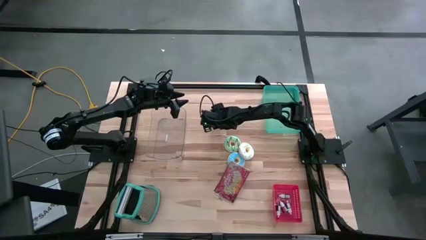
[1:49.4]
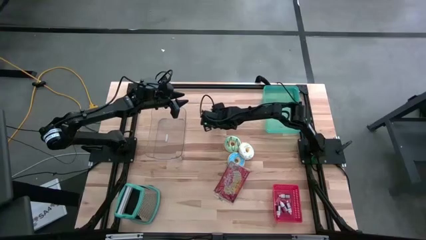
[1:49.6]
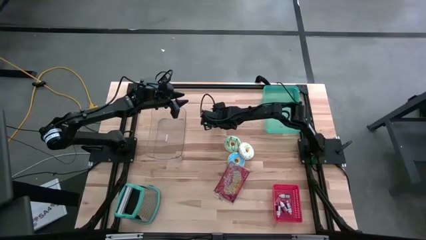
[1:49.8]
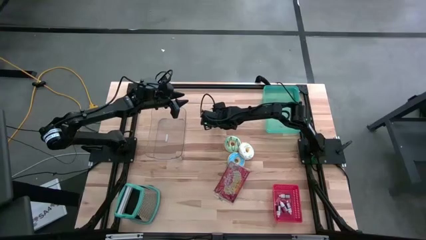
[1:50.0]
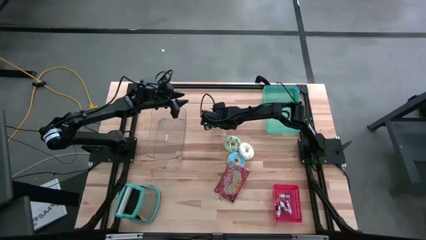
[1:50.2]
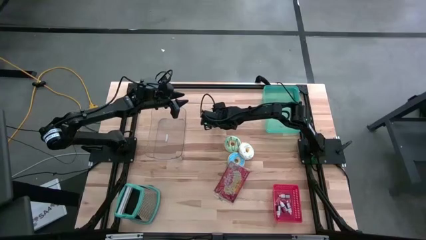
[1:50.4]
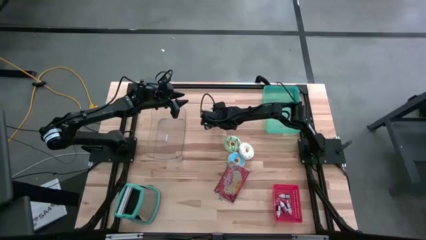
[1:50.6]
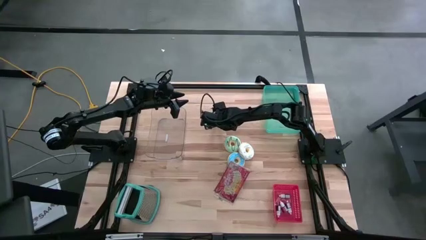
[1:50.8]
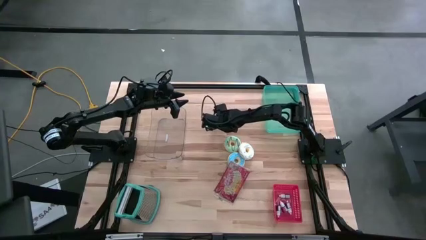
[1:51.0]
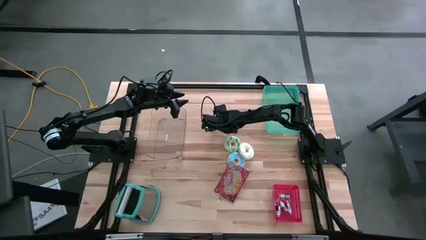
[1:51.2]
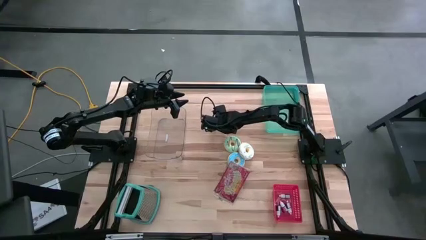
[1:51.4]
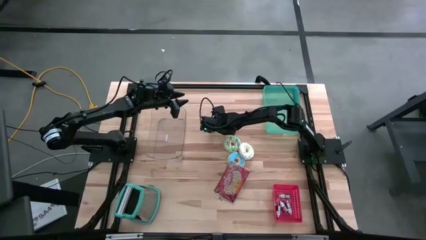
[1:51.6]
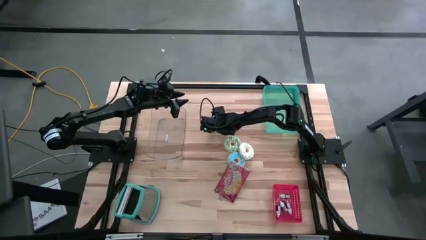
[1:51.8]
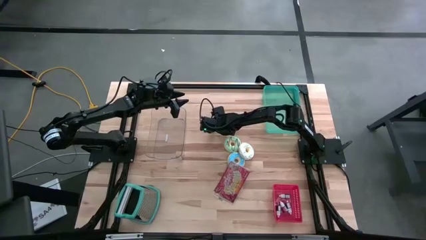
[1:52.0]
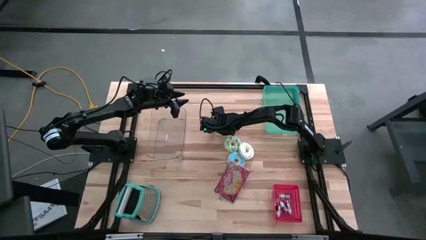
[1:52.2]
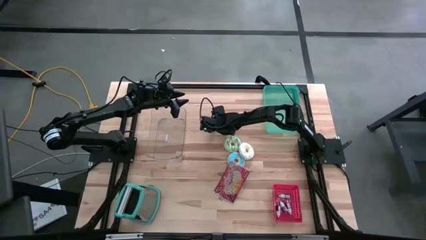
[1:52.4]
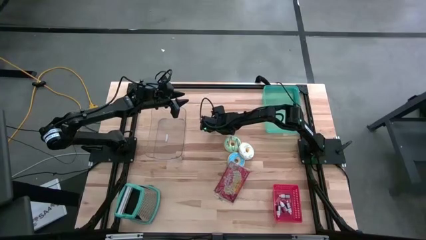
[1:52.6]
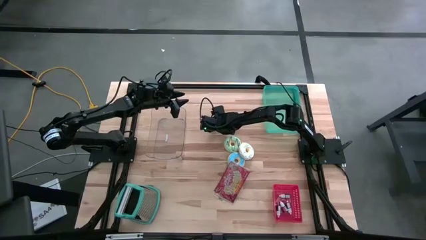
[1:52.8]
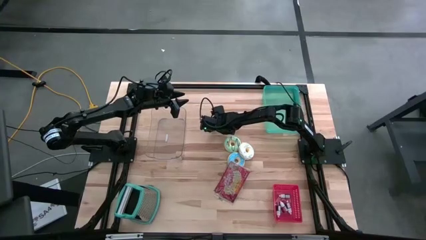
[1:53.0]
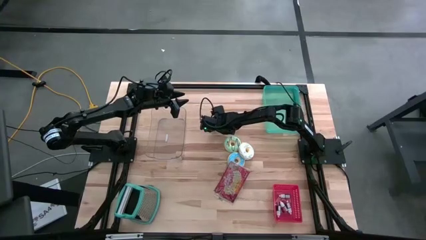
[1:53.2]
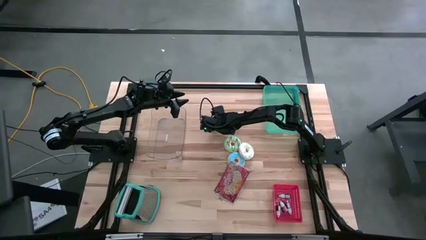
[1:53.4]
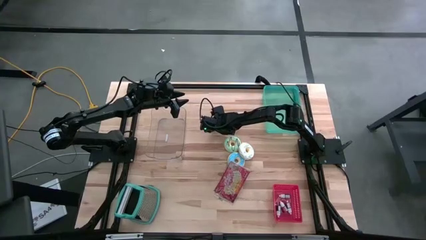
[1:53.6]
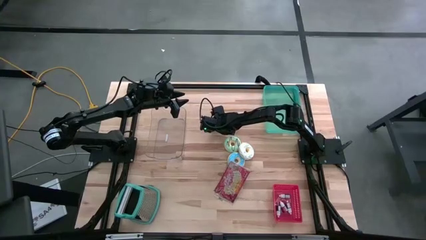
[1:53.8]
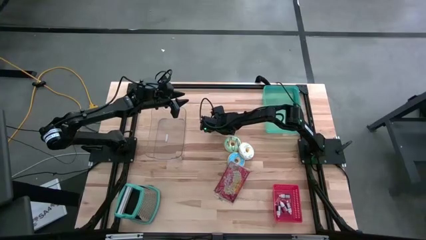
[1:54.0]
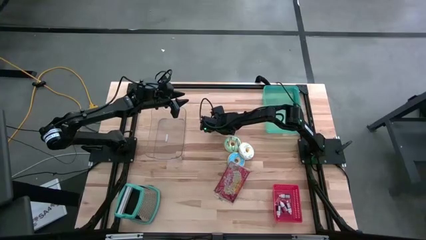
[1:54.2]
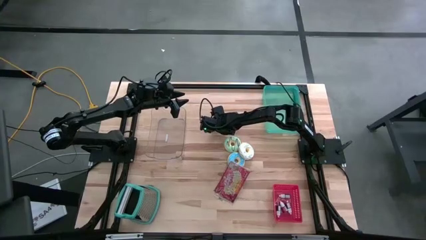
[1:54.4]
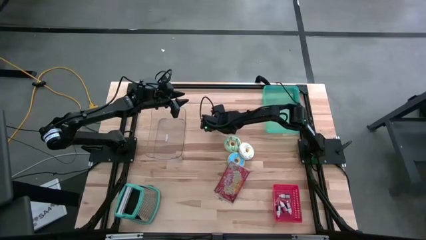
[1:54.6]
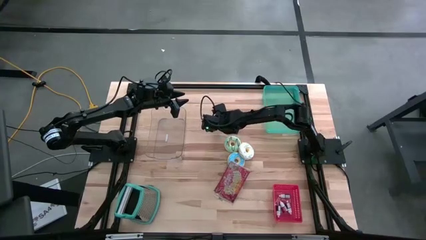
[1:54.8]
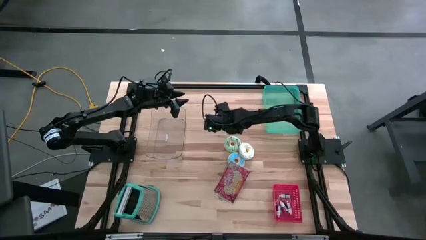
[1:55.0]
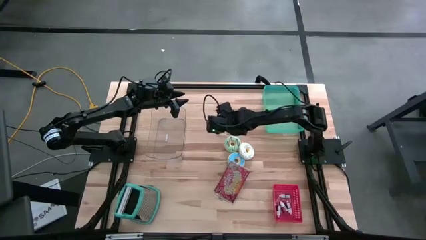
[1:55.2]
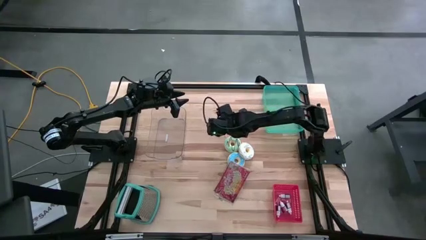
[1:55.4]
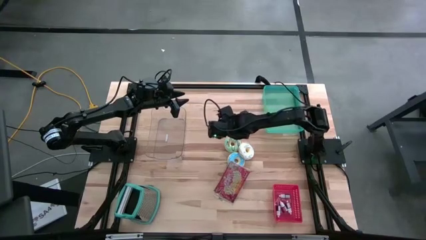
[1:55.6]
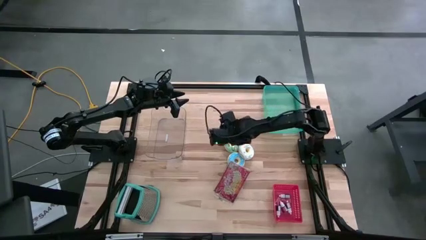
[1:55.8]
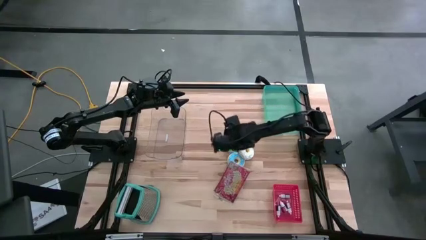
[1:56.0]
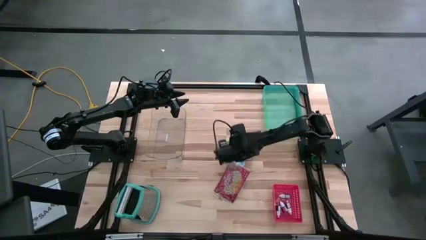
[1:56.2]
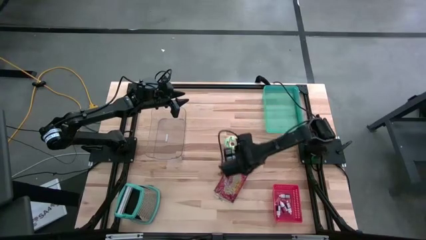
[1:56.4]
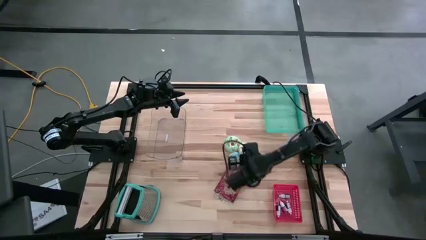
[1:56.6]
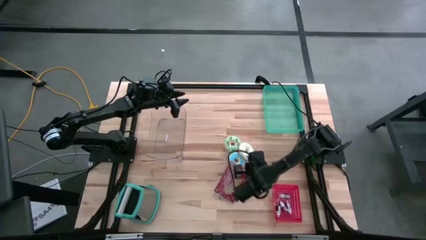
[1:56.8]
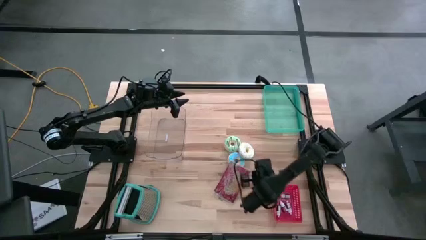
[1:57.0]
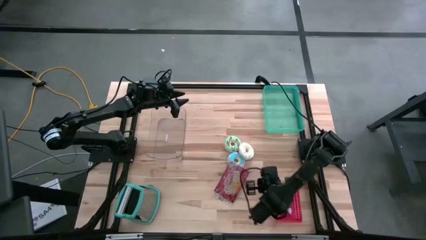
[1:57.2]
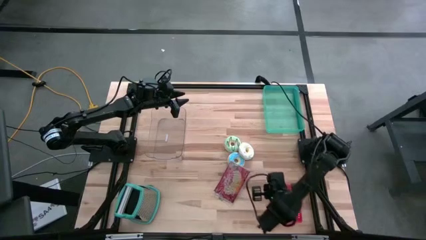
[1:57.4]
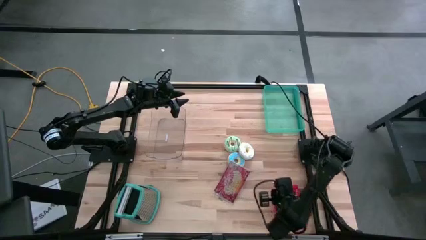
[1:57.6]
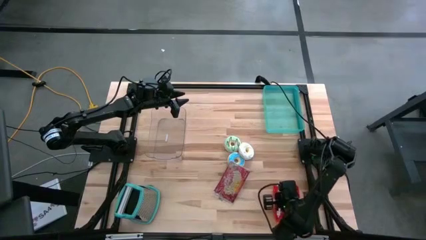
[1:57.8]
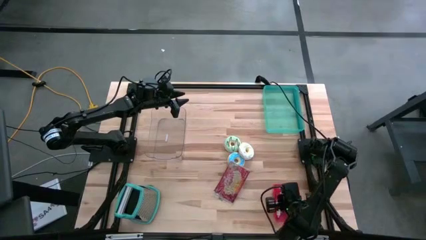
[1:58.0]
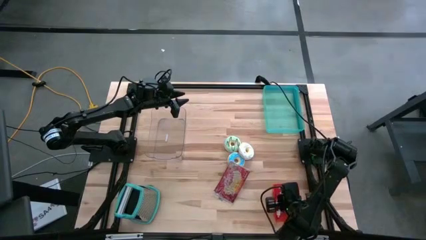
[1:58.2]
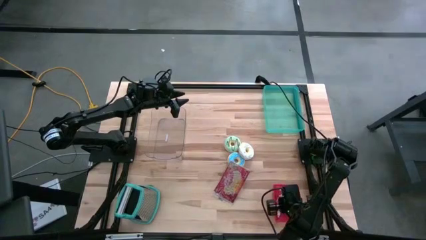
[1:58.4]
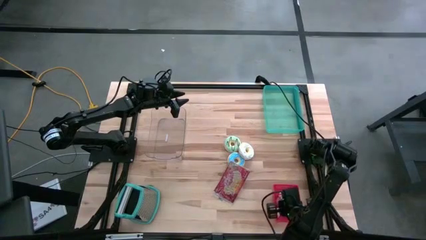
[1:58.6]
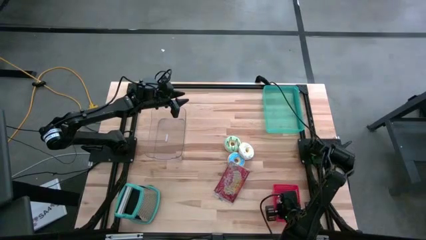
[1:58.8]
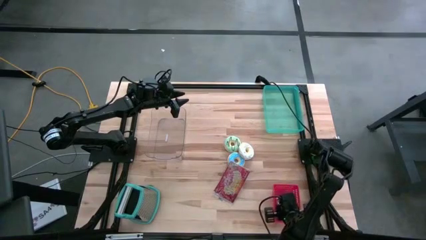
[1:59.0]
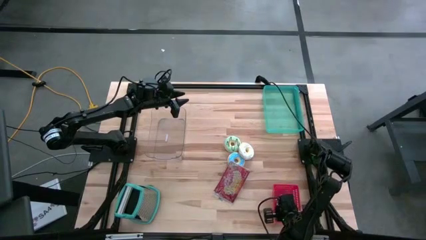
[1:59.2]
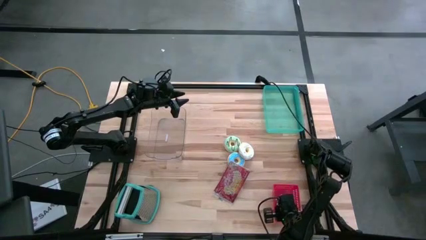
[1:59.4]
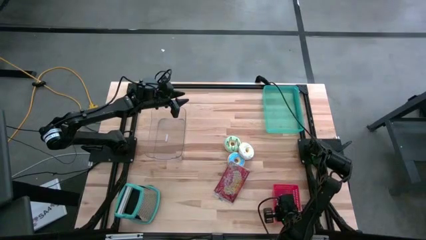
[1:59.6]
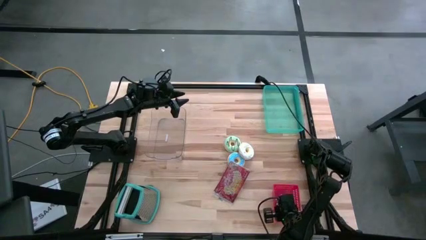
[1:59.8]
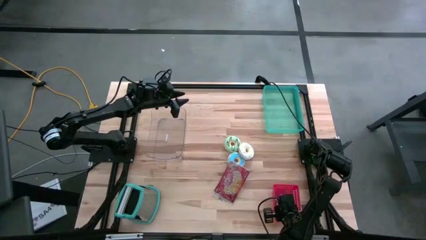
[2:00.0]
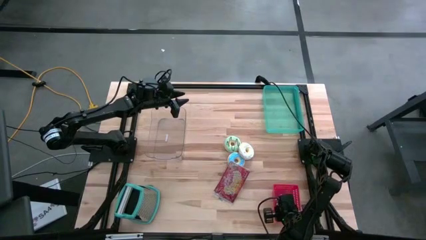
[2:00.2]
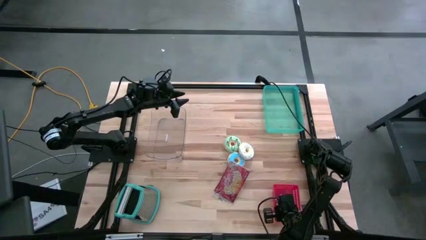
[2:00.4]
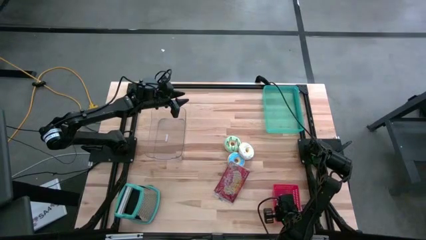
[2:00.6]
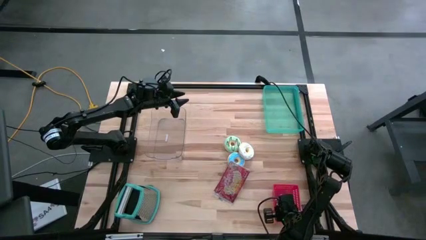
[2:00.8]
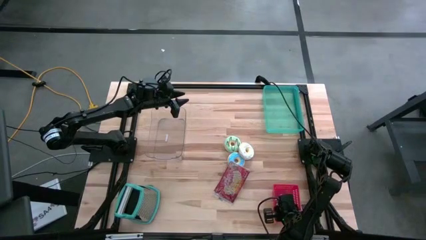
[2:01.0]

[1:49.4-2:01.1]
Put the orange food coloring into the red bin
